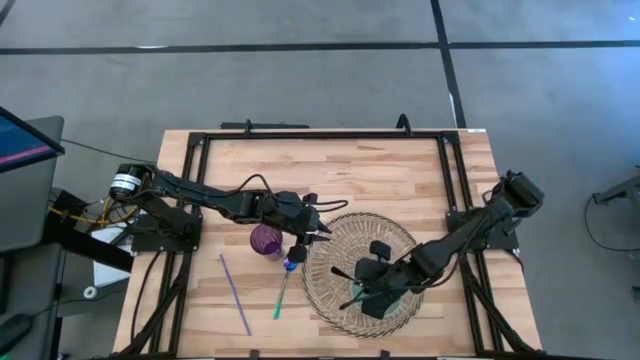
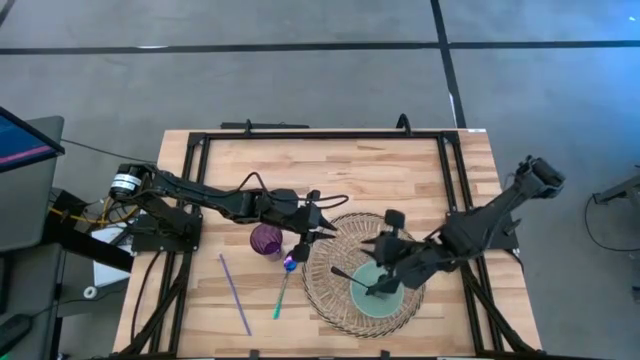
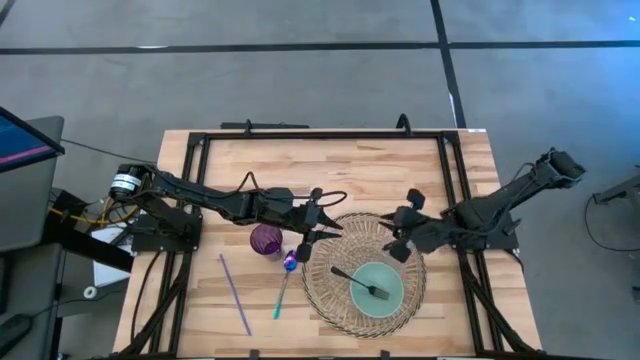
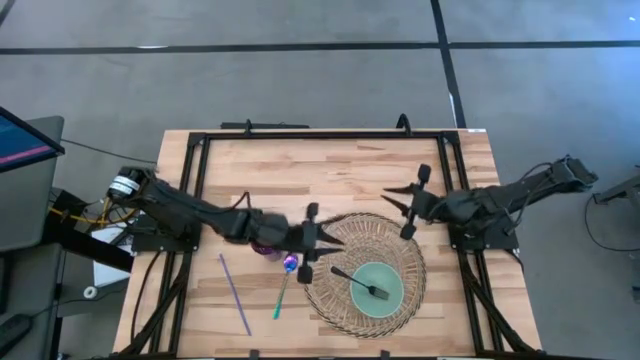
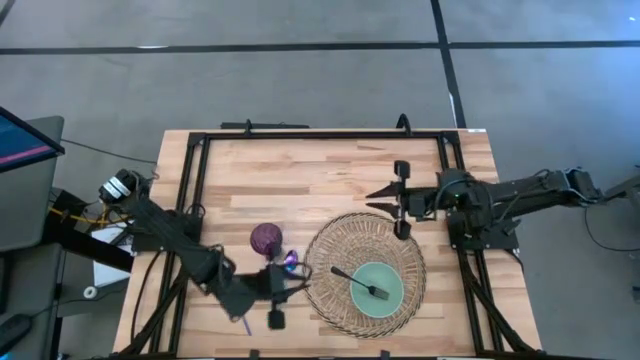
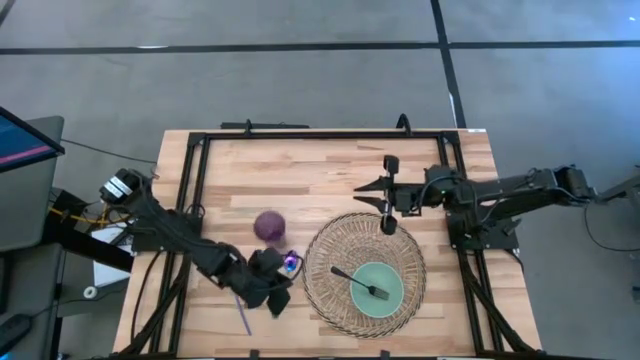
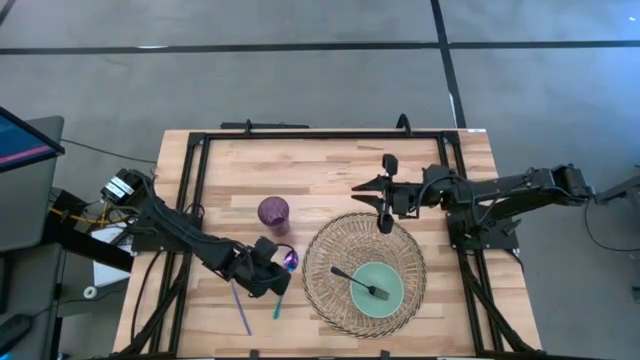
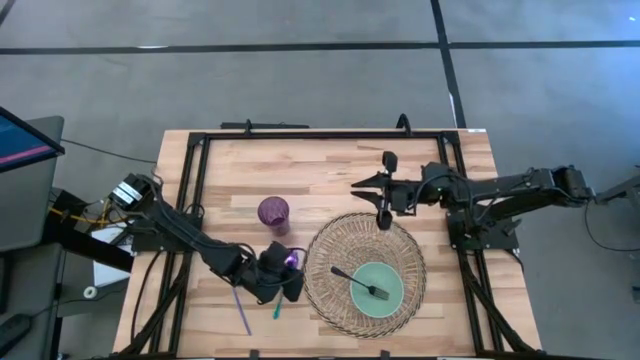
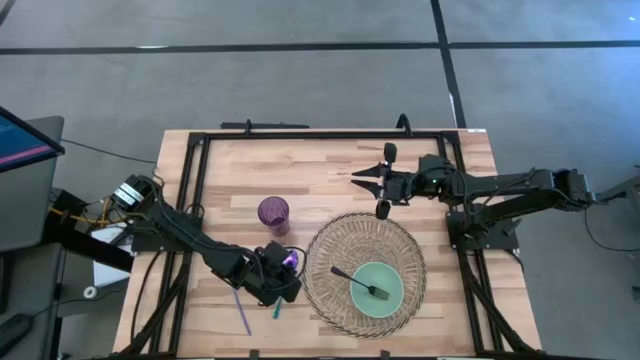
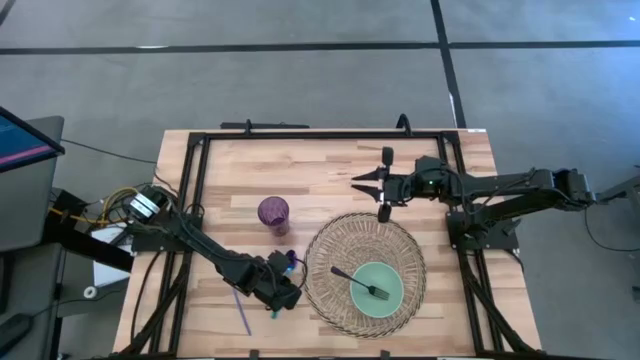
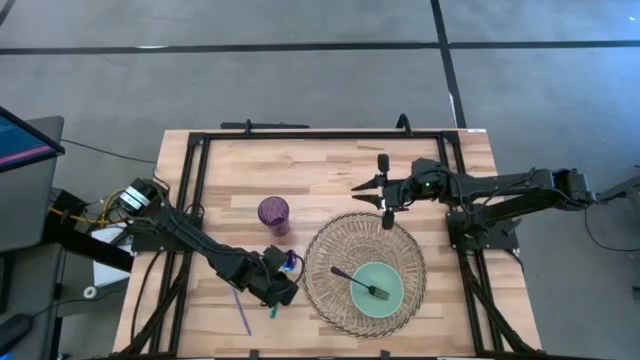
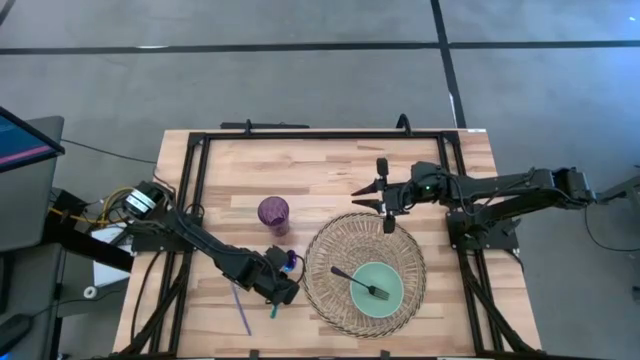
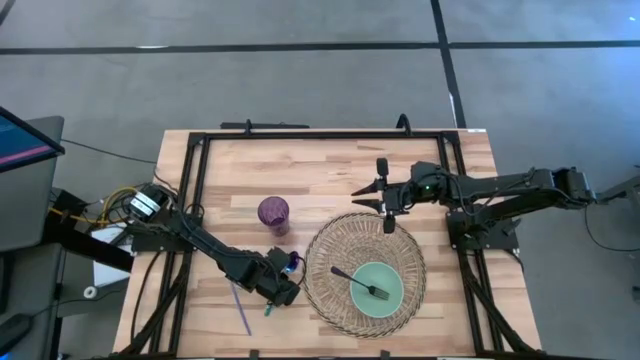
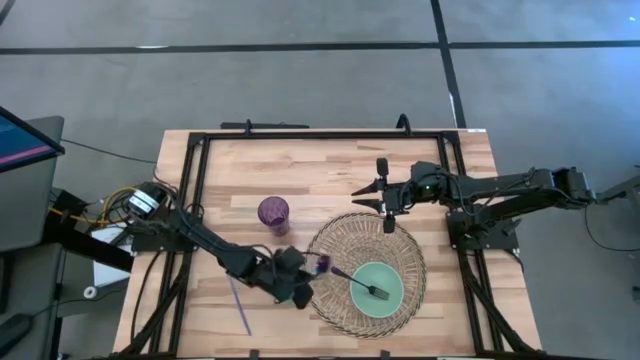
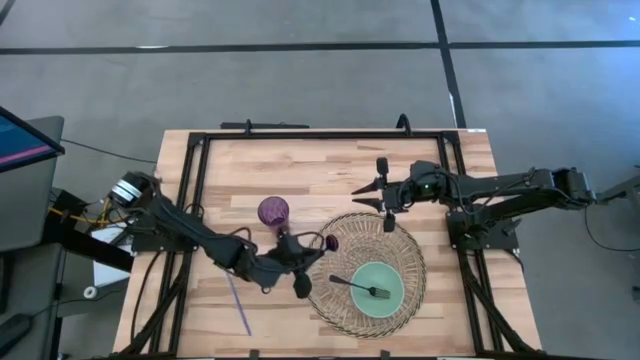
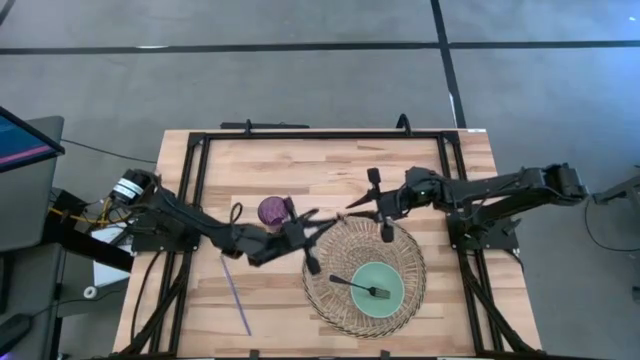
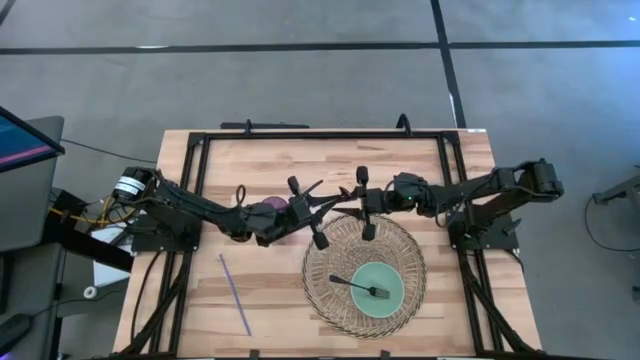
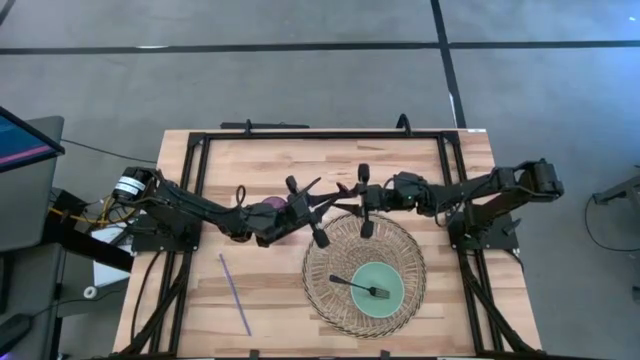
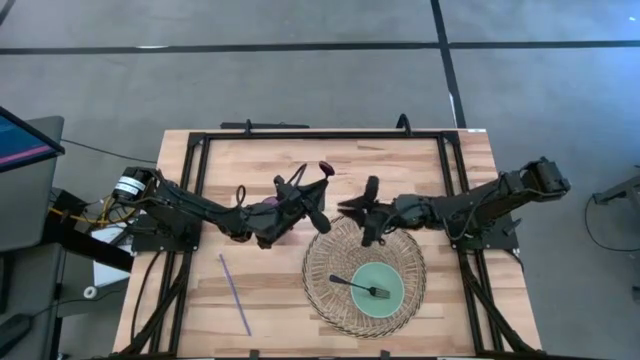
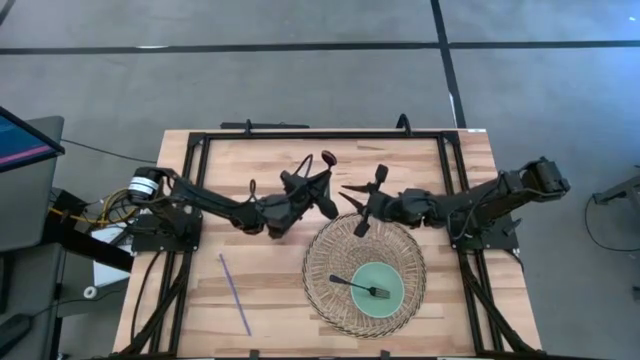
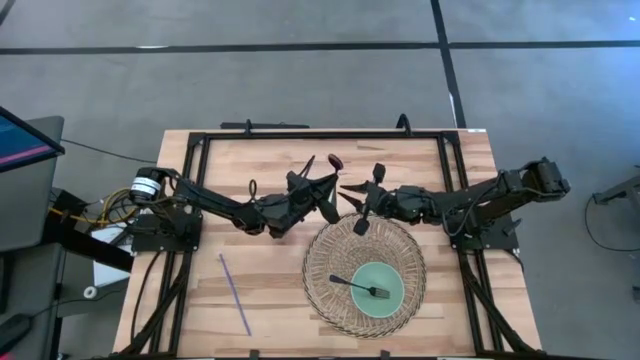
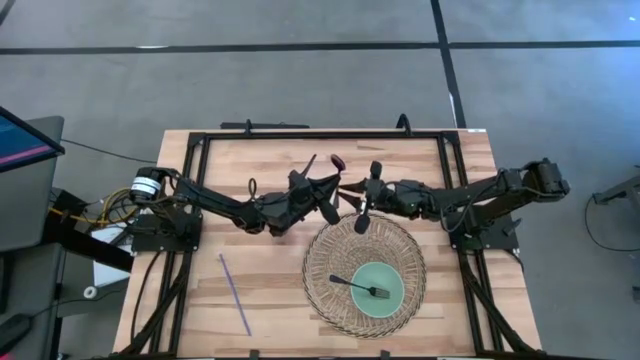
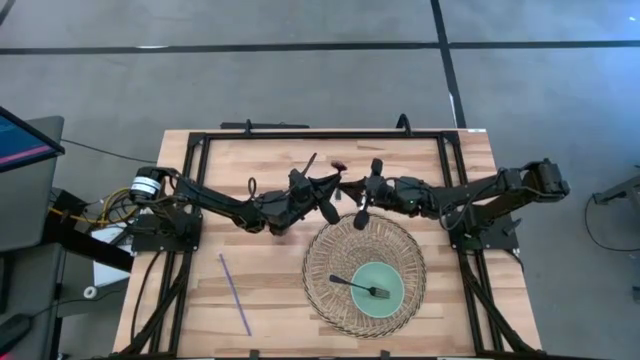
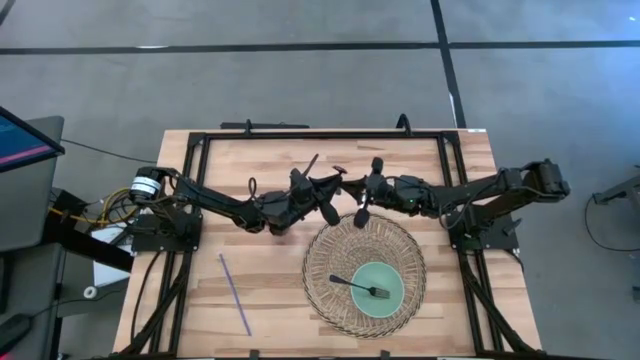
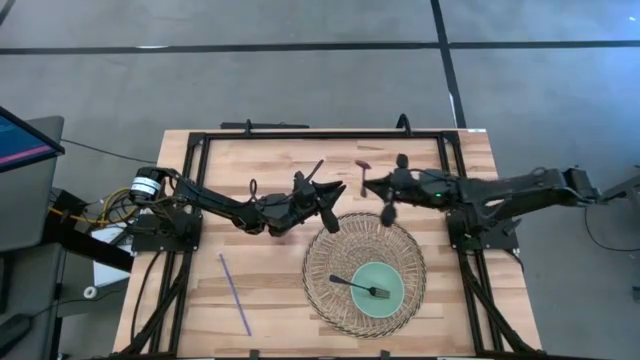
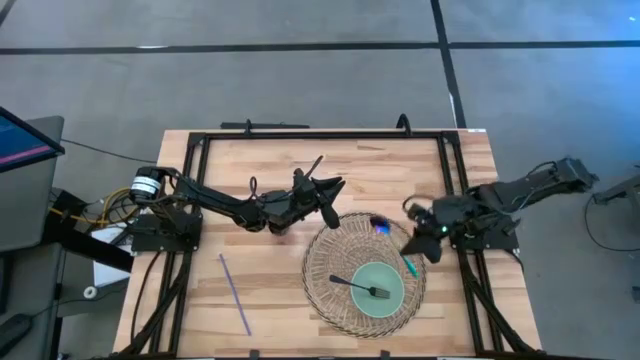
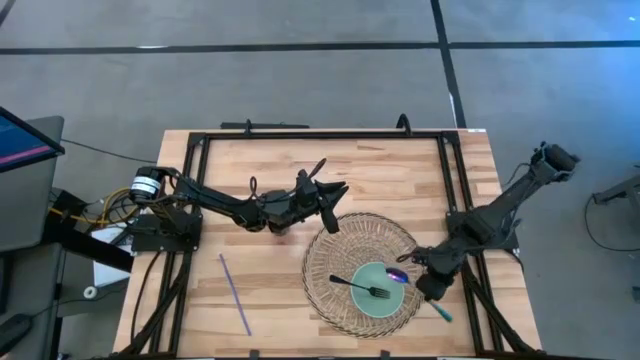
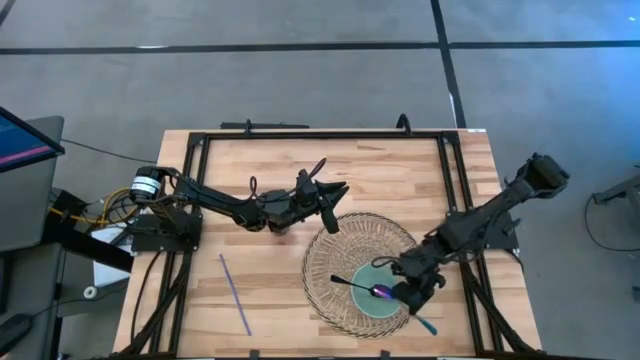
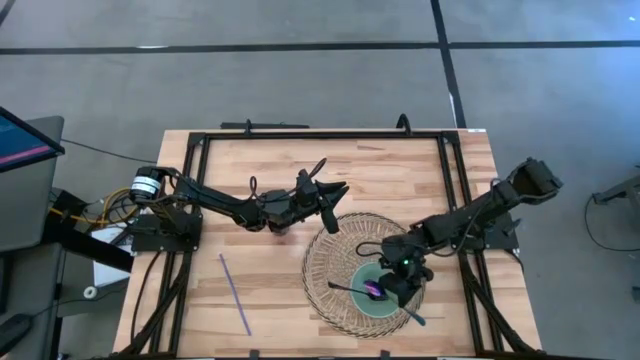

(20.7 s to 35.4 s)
Task: Pick & Place Utensil
Put the blue spoon into the green bowl to the left of the black fork

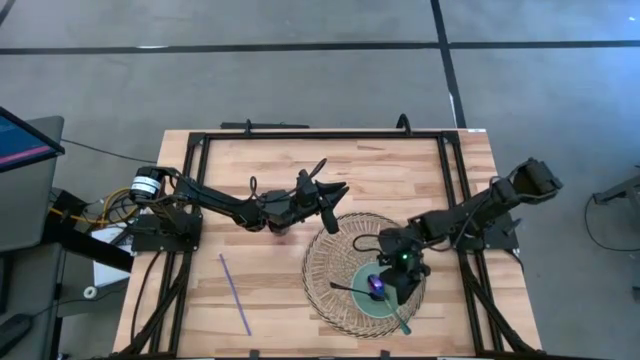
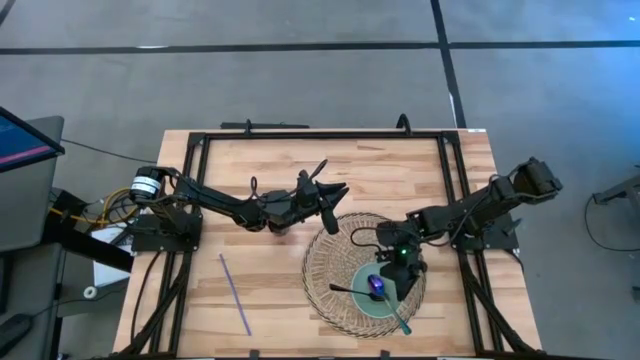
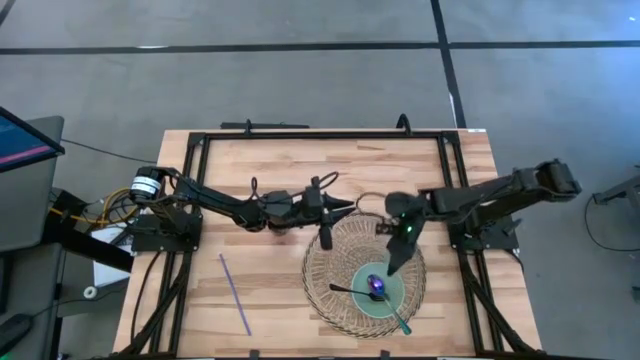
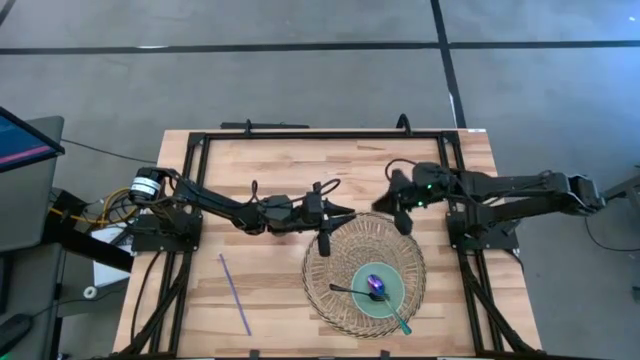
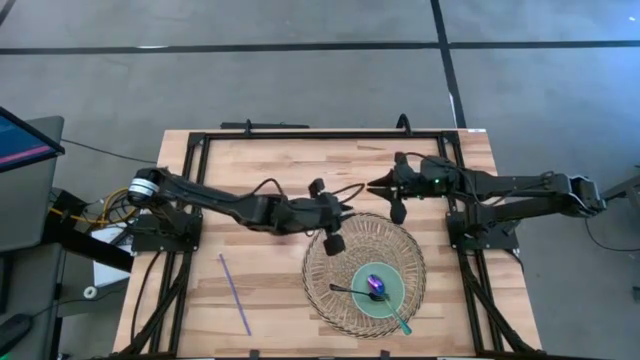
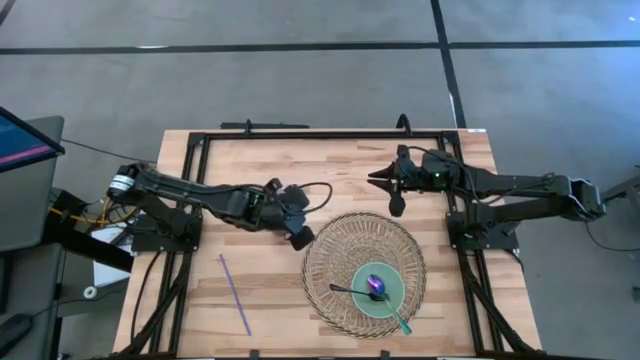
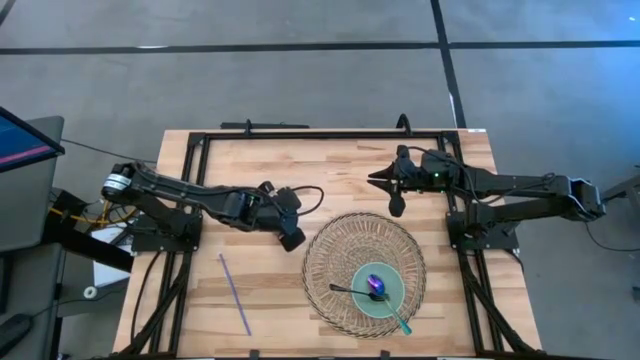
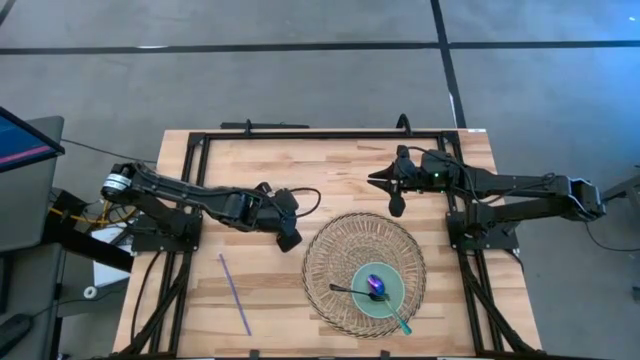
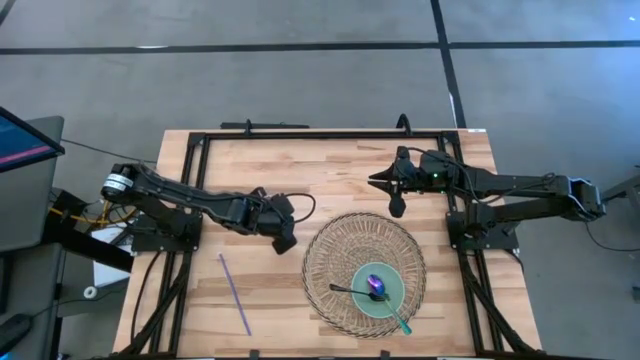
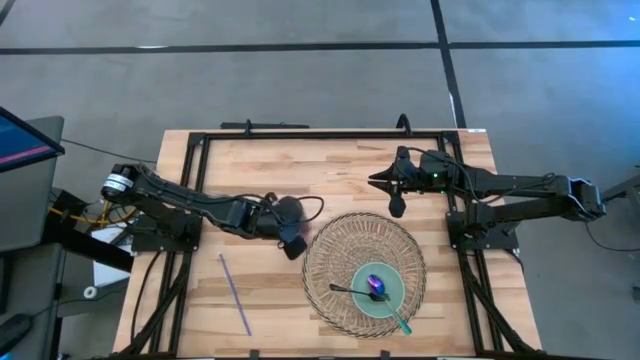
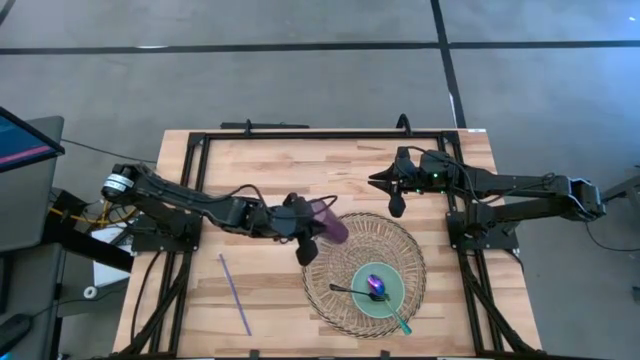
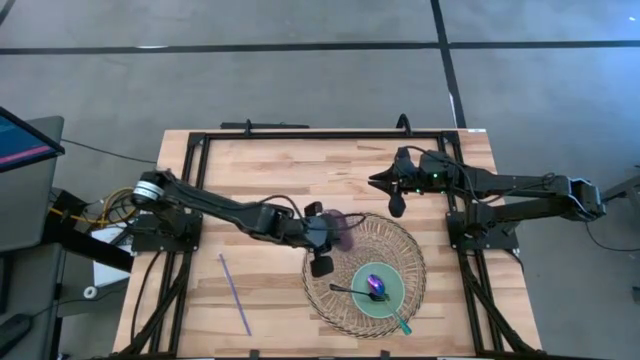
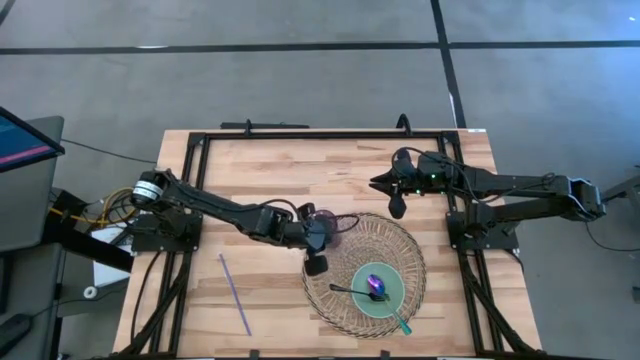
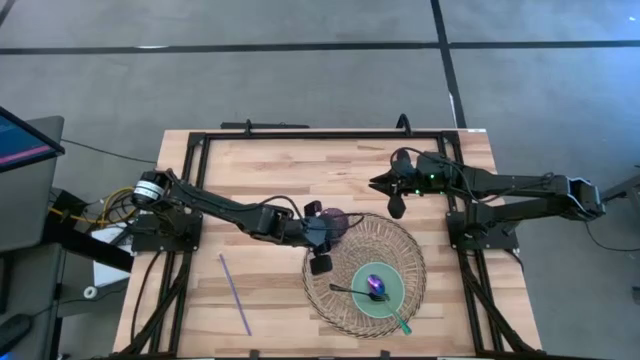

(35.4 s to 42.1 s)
Put the violet cup on the brown mat to the top left of the green bowl
